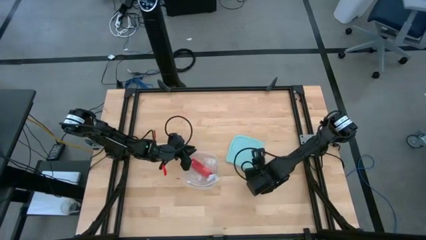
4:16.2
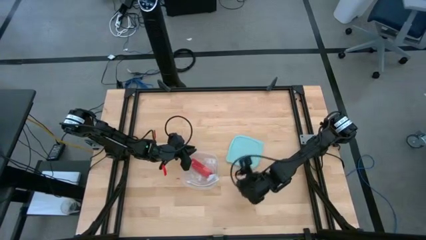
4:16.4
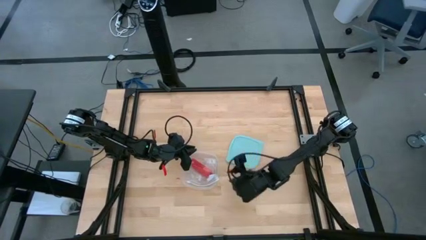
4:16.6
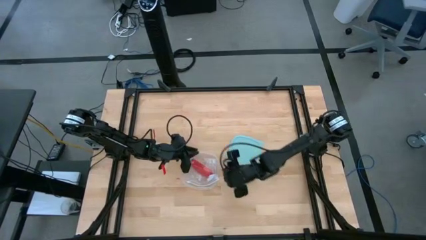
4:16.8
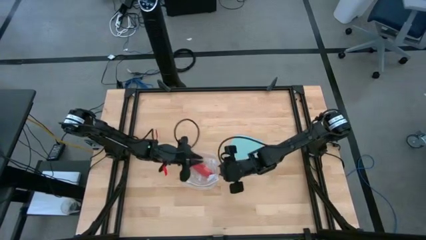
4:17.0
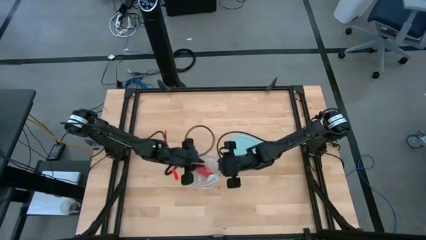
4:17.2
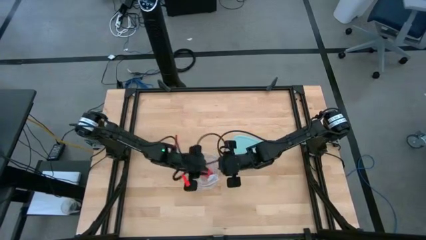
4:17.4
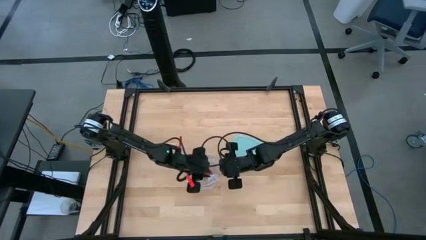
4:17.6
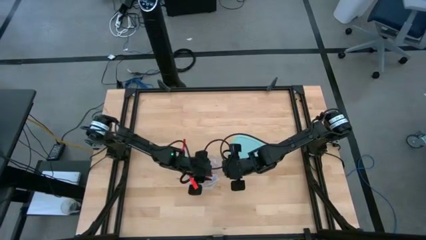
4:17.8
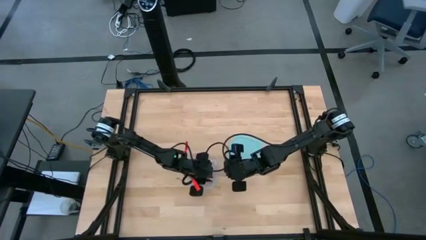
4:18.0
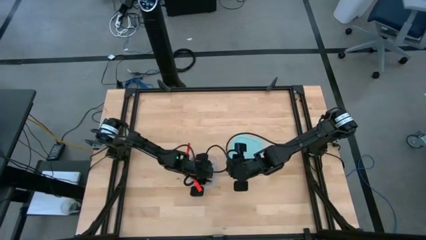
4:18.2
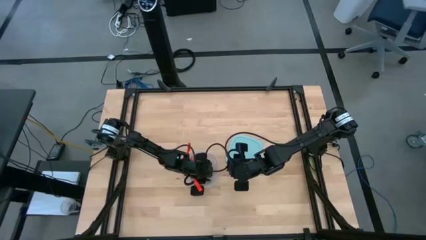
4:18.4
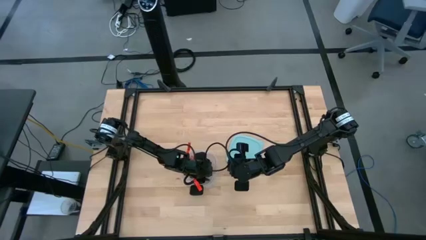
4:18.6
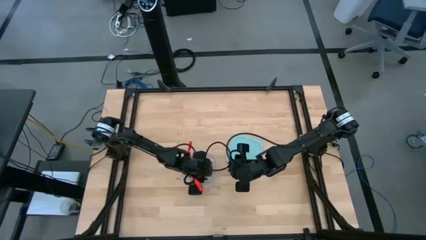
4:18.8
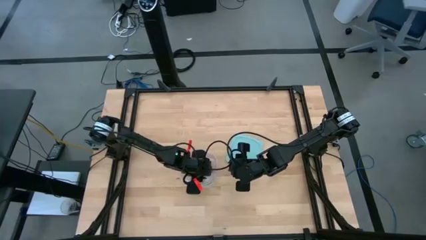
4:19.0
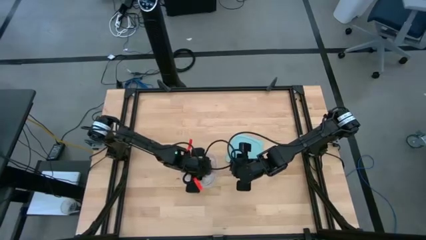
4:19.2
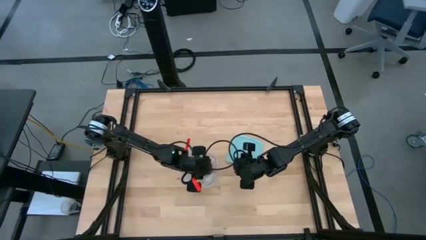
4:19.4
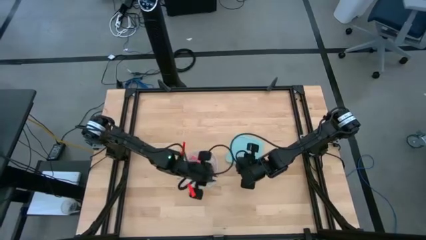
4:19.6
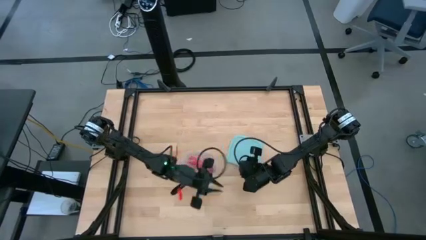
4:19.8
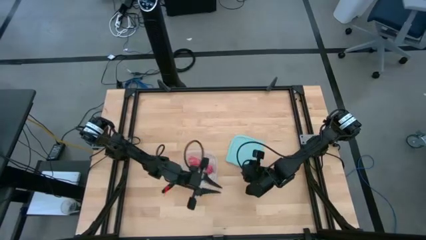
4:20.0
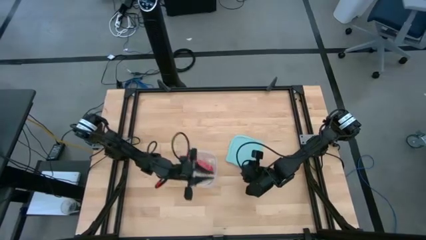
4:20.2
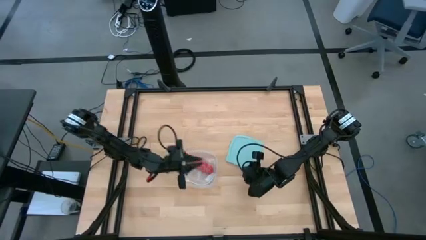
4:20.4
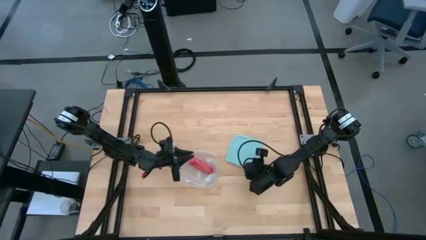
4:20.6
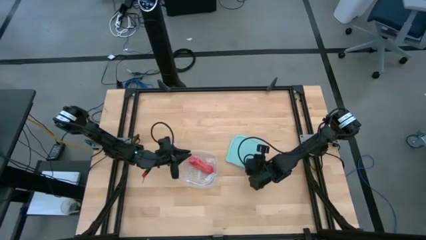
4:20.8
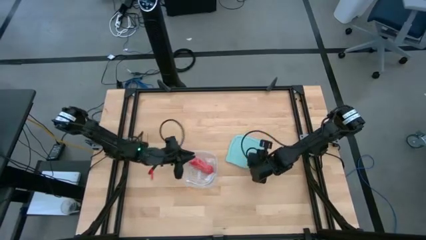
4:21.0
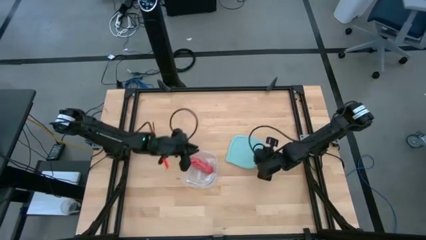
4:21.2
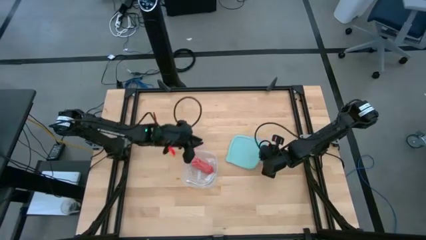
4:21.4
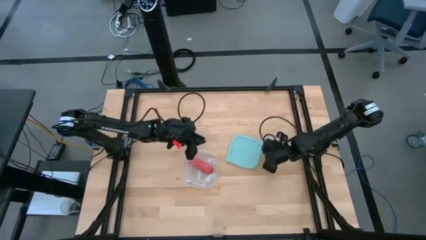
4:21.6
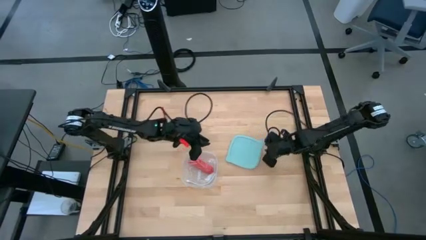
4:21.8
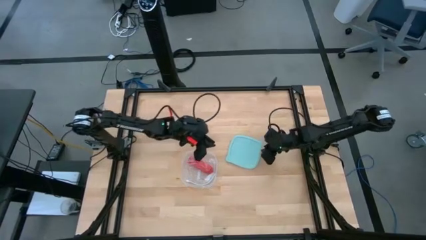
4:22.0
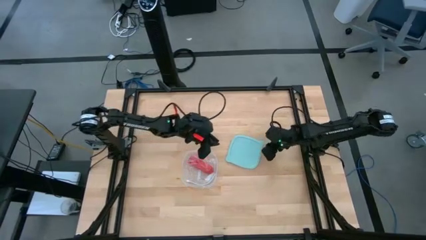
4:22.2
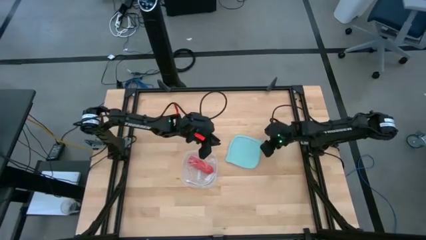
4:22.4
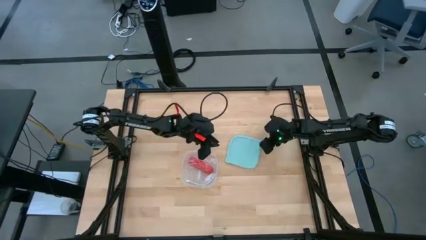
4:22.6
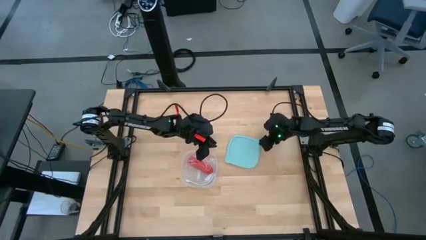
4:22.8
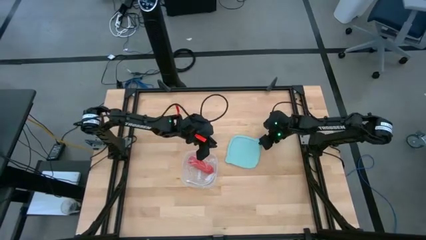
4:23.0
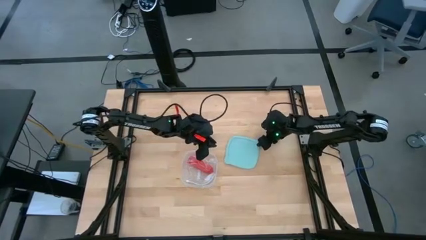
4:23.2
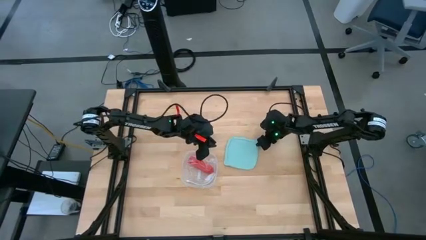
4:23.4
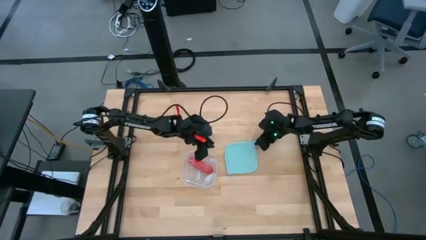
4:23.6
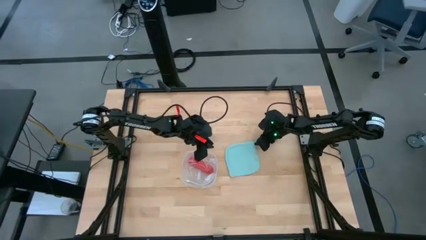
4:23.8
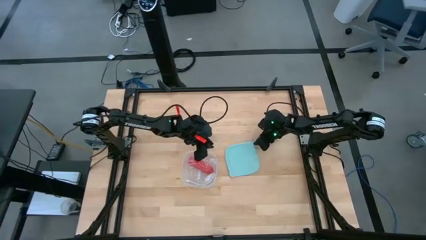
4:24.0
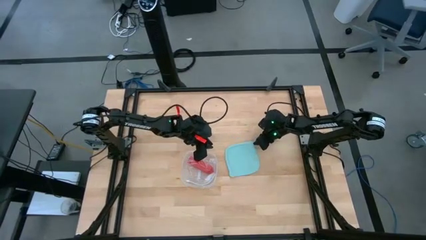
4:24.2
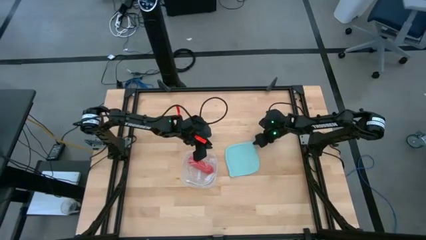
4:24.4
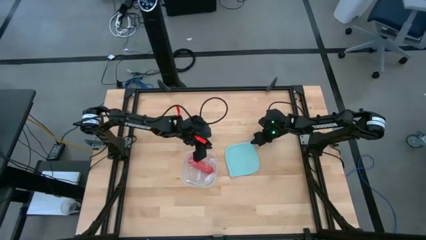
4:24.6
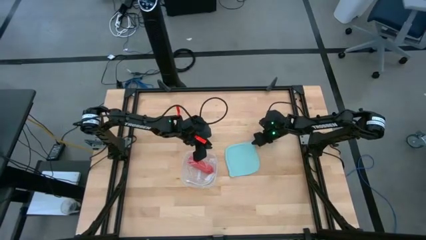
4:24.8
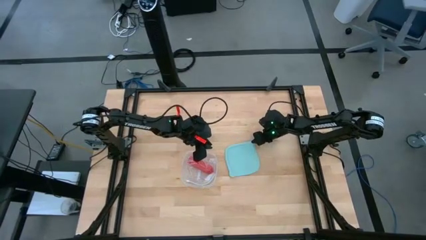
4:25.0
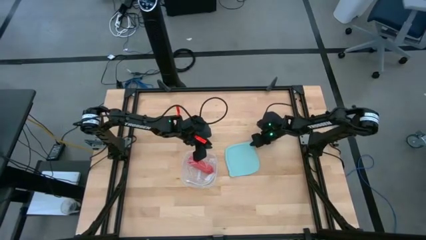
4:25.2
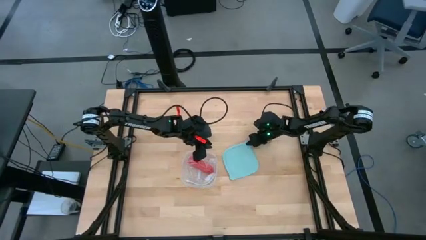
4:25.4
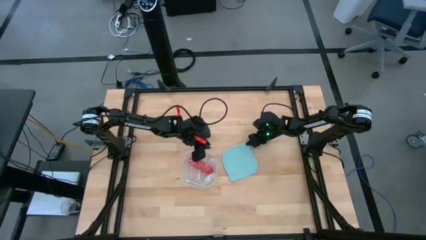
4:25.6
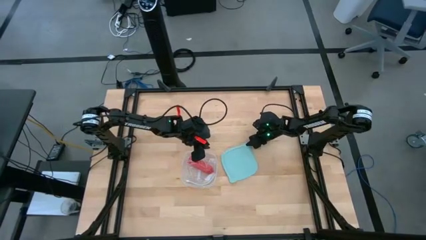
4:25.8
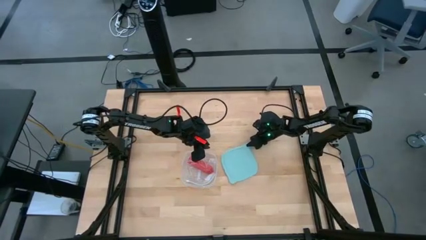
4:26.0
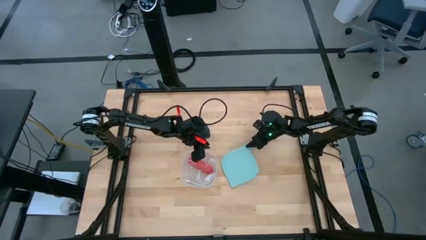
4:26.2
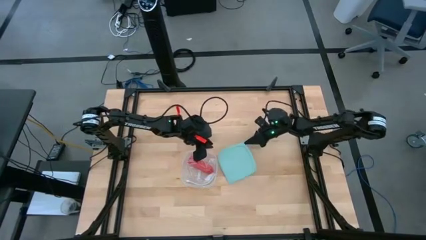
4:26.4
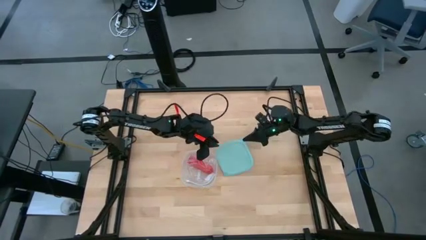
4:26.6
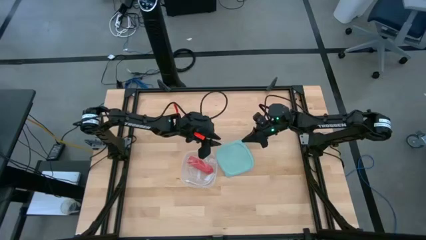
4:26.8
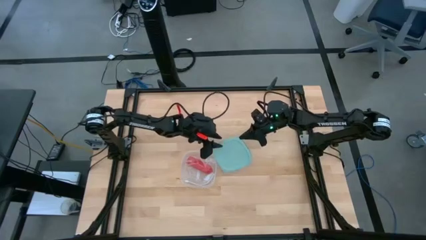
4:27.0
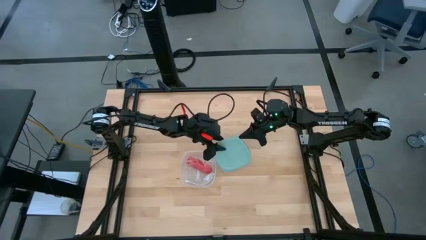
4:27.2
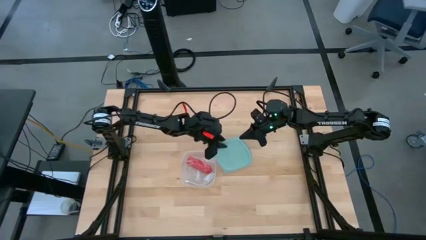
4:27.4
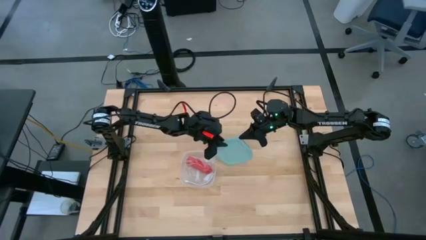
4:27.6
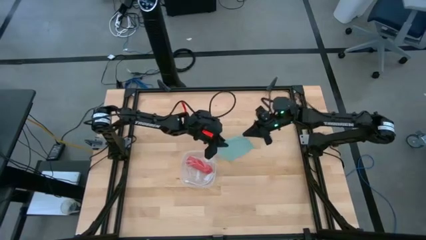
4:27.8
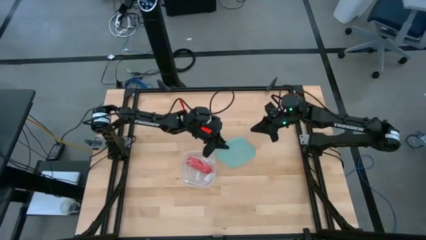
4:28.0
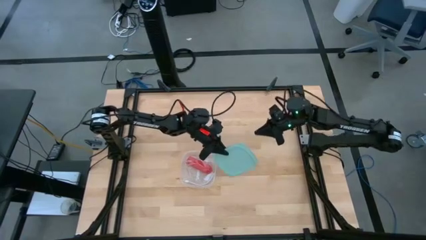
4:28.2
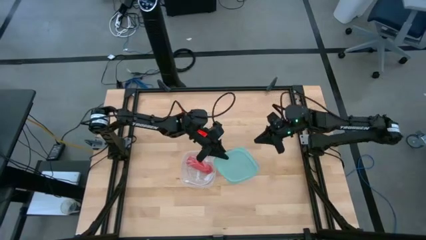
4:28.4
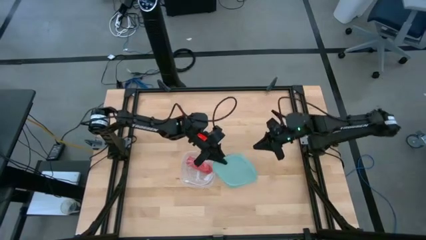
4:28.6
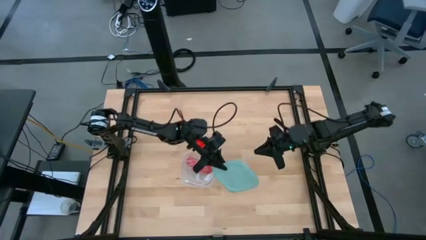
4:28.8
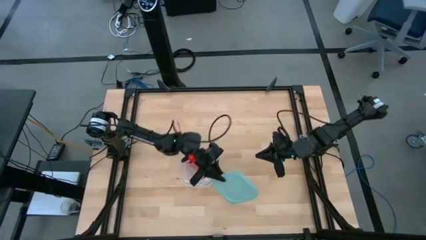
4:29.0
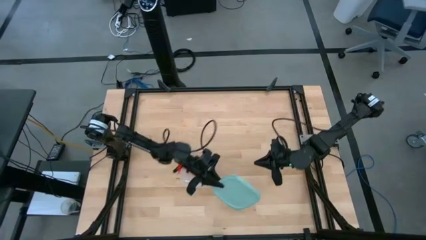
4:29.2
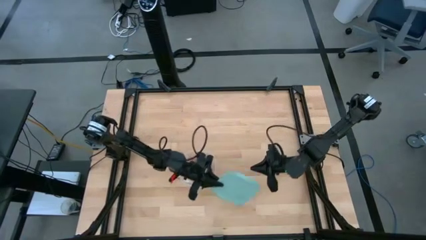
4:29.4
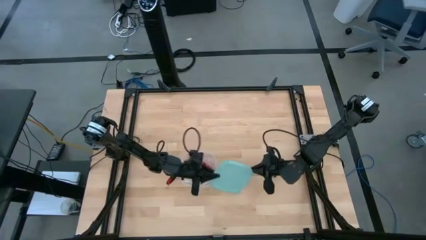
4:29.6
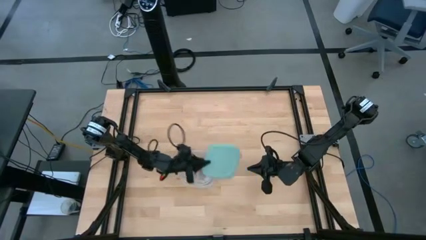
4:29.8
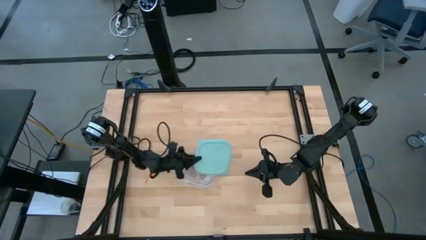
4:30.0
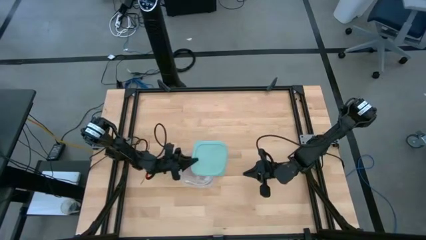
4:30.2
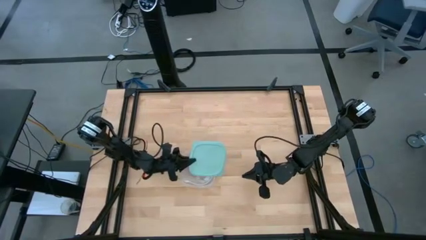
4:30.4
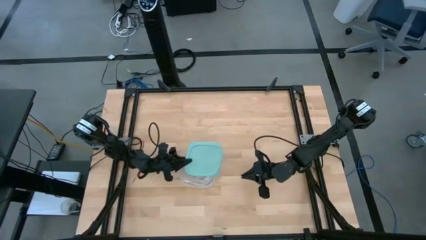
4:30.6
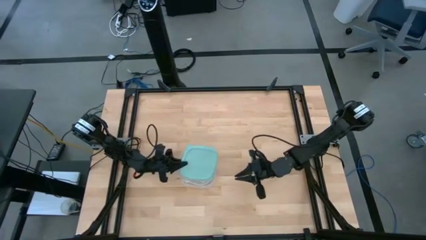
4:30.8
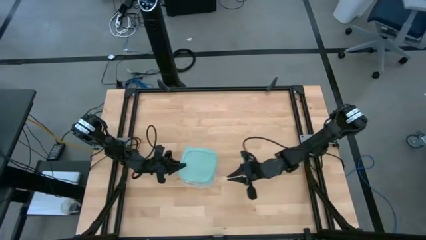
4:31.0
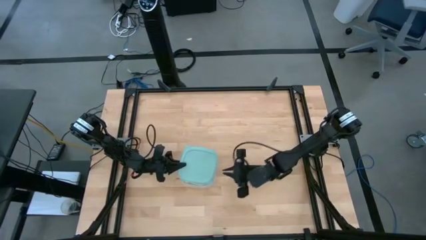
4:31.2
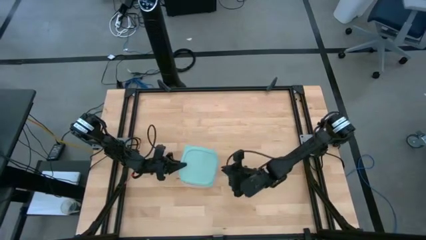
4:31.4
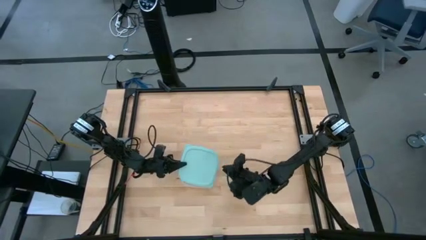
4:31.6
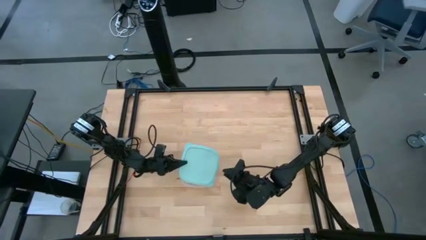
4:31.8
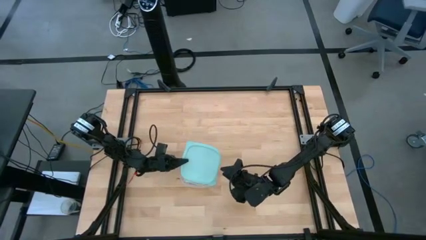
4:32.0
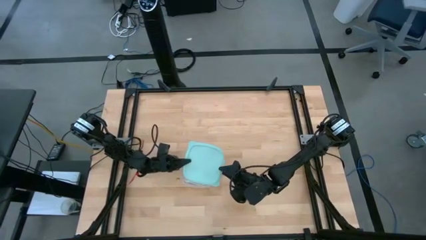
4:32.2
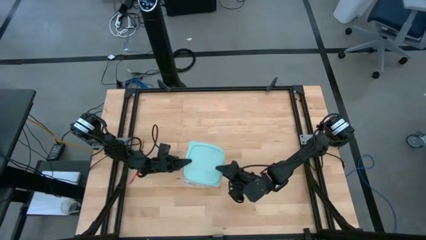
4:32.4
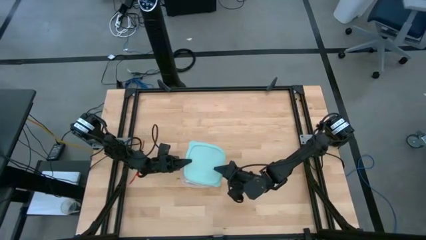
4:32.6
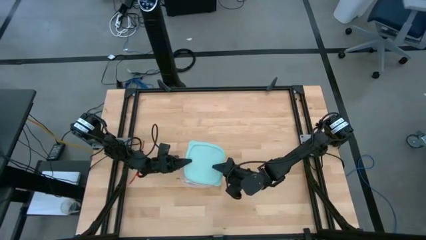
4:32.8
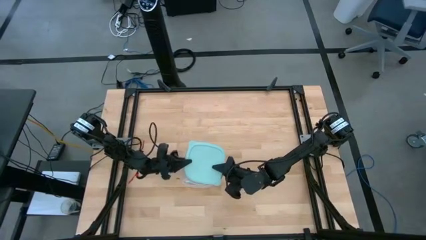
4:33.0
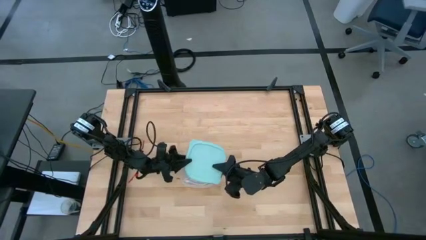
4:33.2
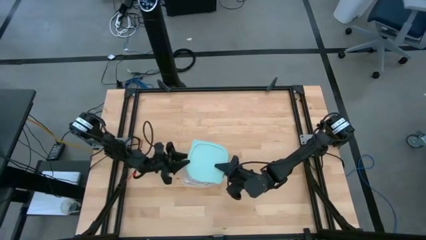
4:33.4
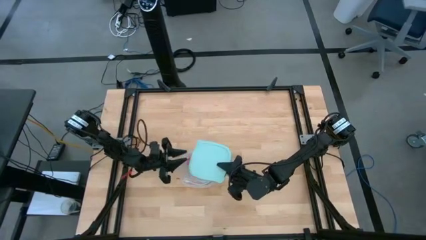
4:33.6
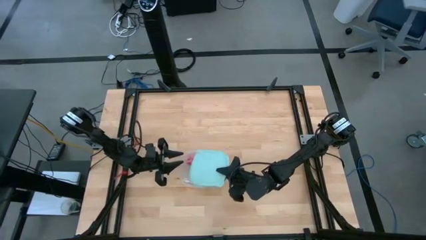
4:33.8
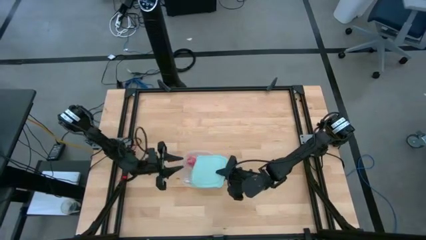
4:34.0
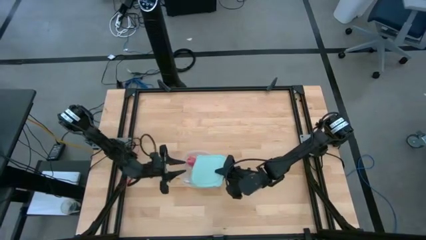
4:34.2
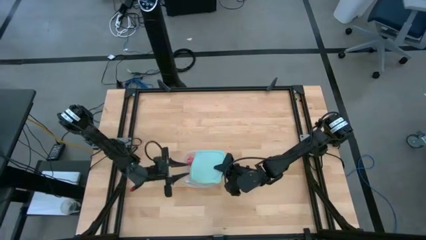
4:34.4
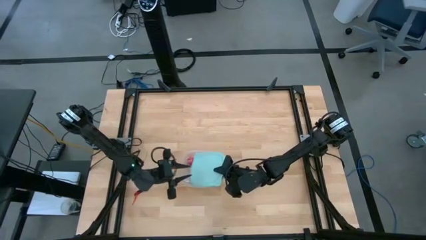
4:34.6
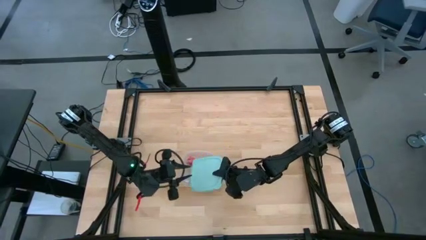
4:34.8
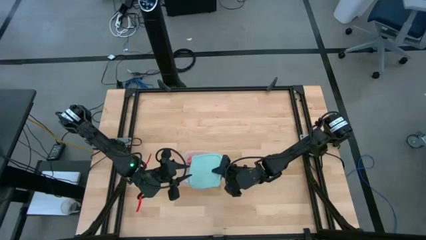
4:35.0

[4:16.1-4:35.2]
Task: Roll bandage
Close the transparent tupperware
